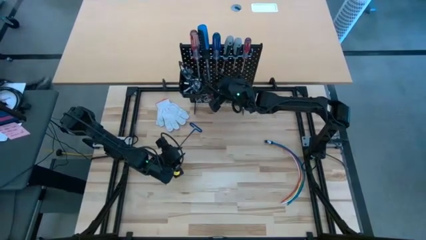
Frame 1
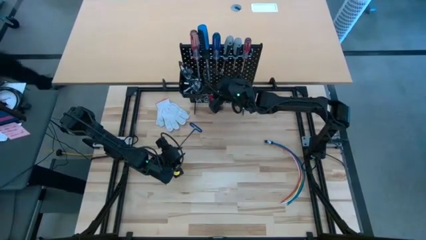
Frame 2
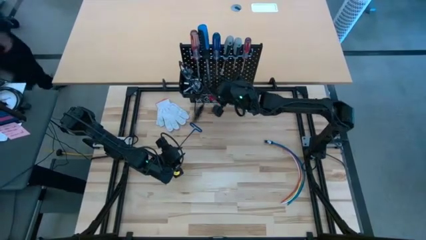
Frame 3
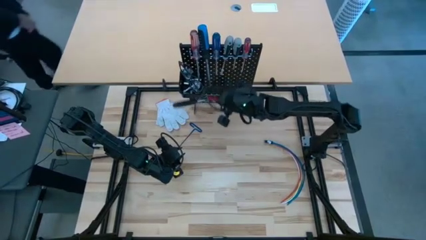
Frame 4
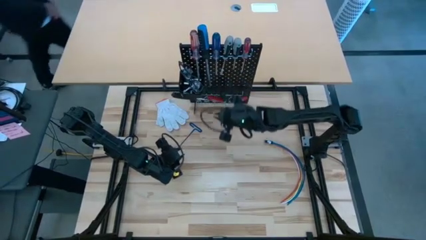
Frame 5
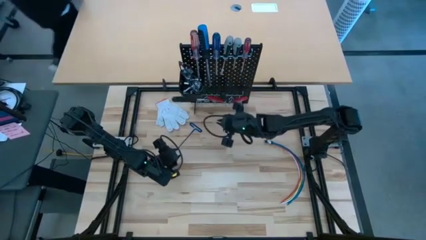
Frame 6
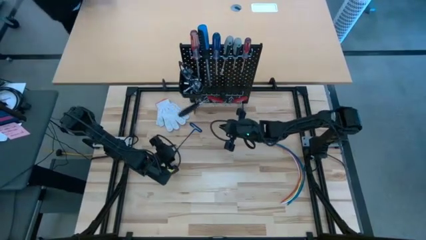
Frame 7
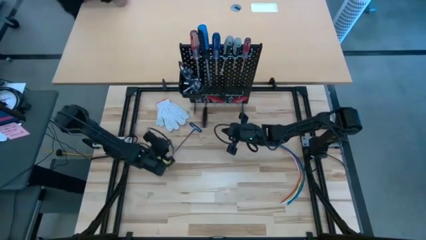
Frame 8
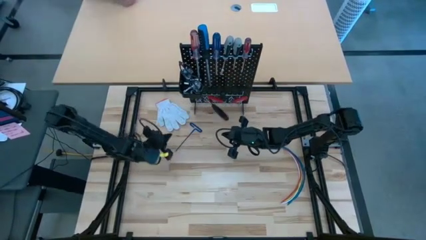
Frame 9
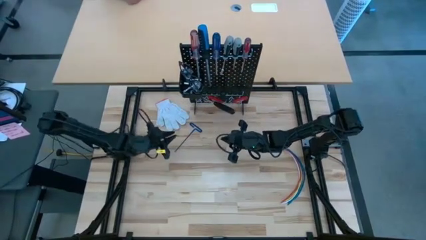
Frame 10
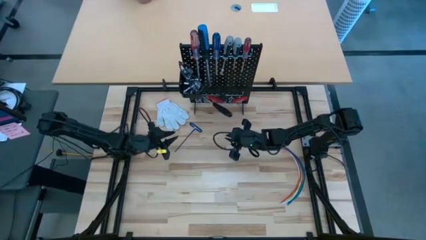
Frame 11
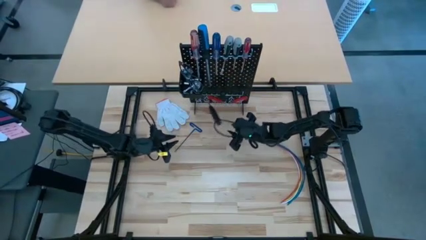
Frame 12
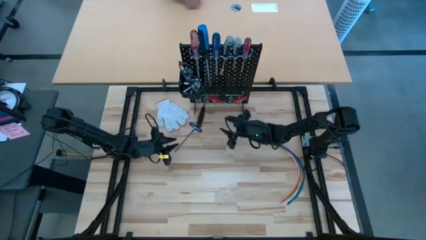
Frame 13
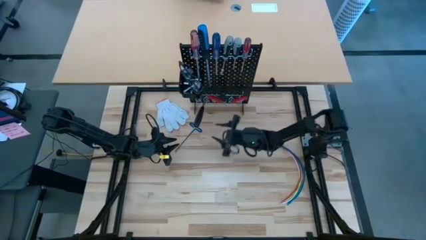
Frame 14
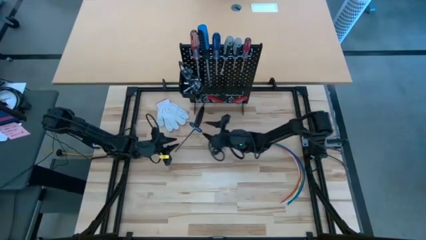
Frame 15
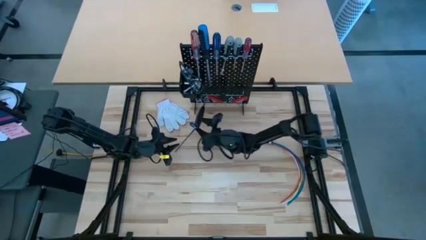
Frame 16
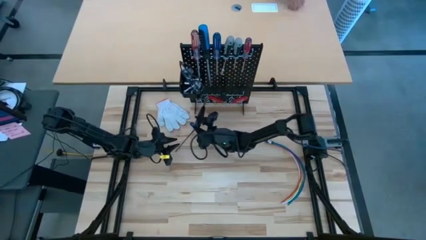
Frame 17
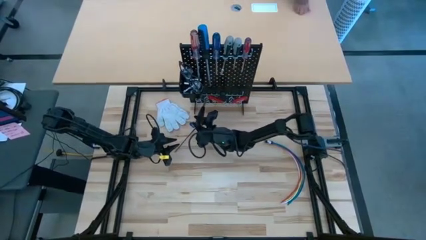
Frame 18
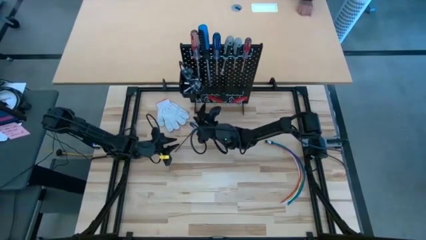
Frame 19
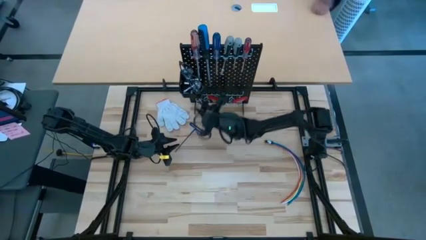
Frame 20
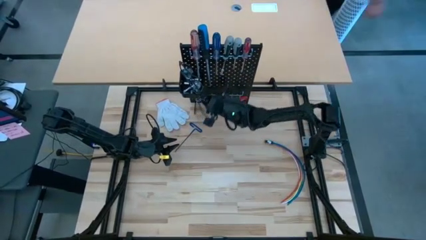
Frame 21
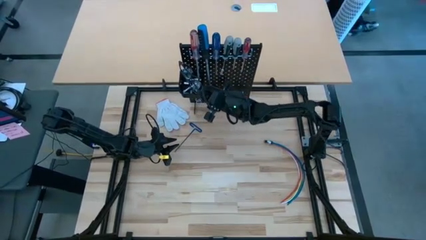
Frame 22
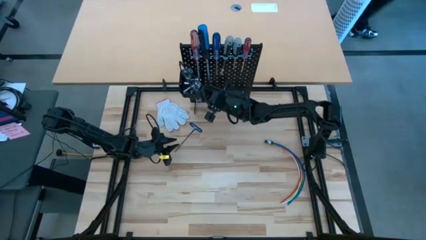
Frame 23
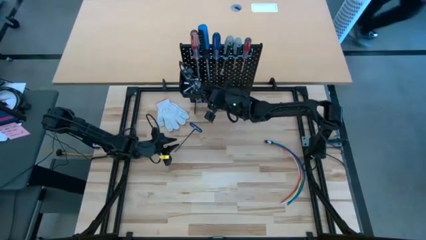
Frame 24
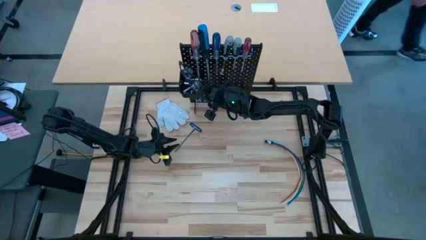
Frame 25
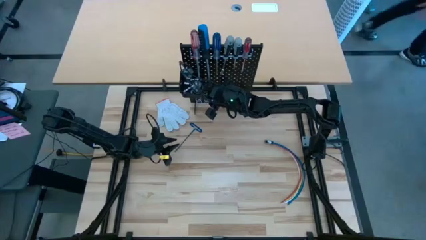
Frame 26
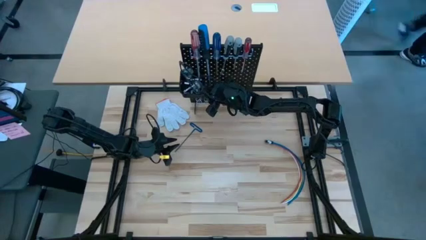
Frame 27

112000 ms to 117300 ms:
Task: Hang tools onto peg board
Hang the black screwdriver in the pegboard

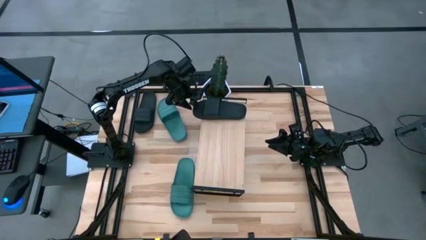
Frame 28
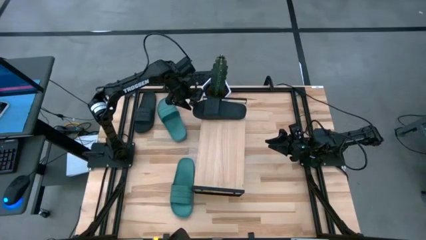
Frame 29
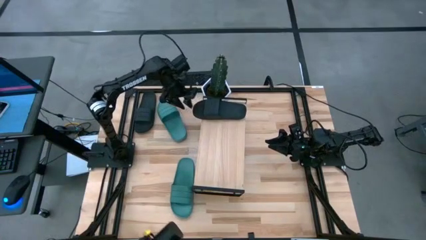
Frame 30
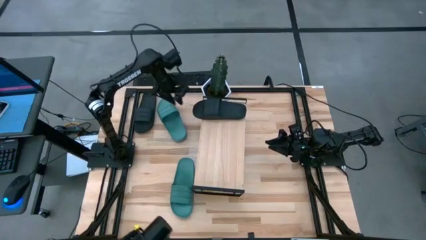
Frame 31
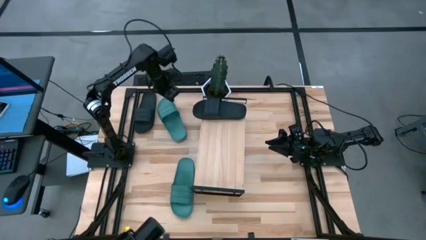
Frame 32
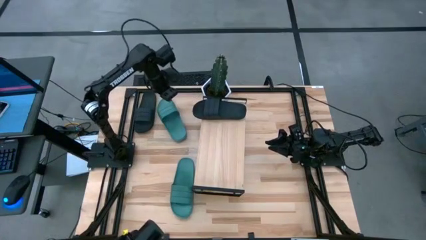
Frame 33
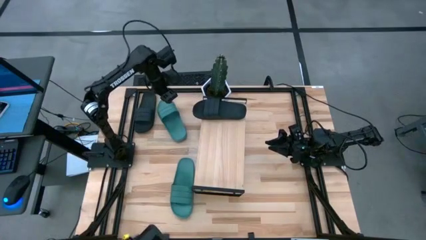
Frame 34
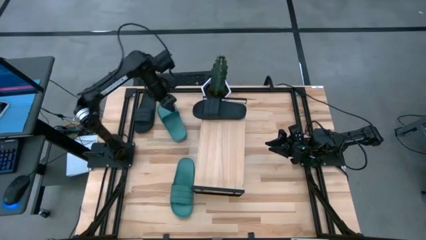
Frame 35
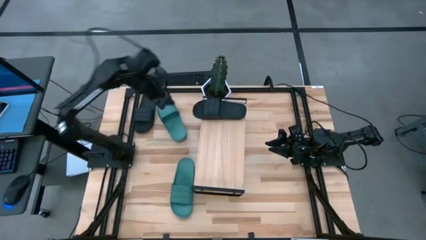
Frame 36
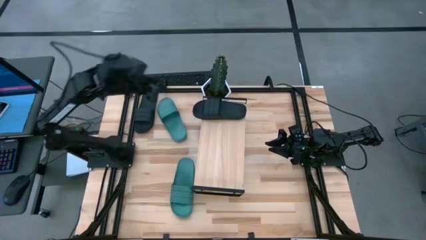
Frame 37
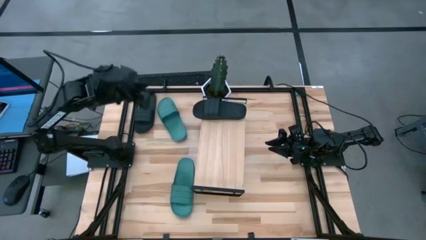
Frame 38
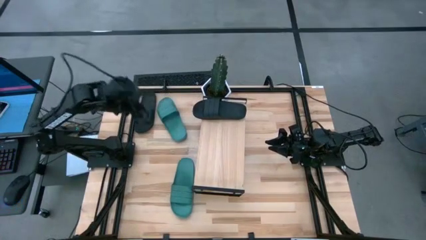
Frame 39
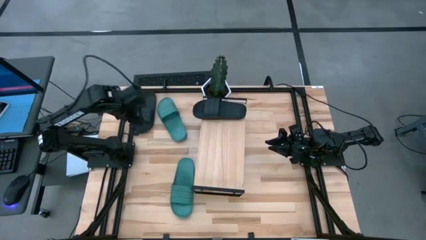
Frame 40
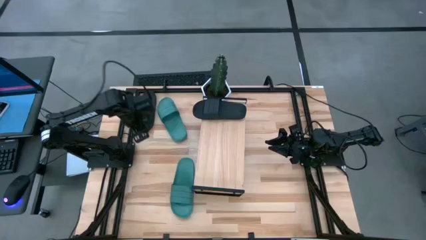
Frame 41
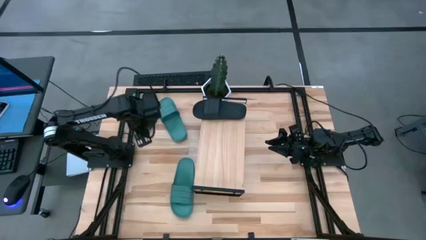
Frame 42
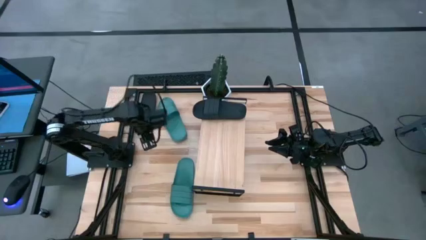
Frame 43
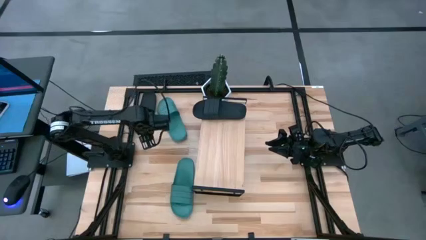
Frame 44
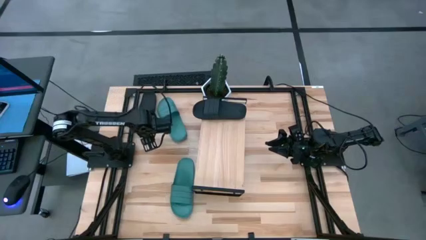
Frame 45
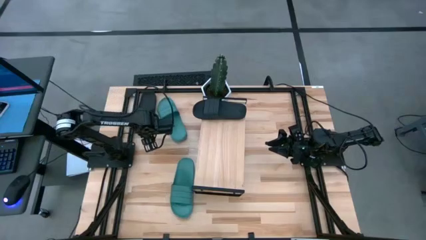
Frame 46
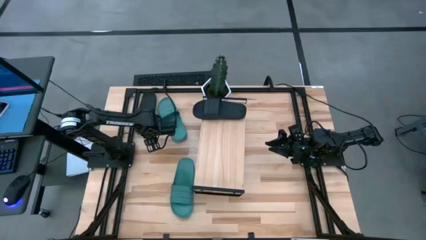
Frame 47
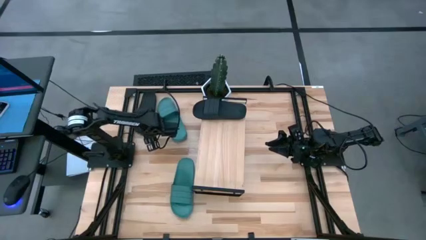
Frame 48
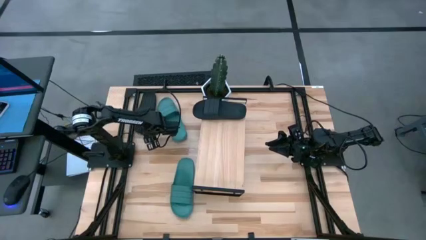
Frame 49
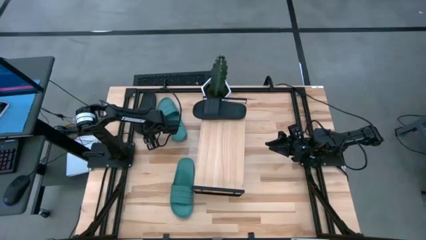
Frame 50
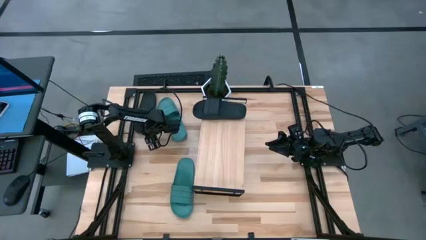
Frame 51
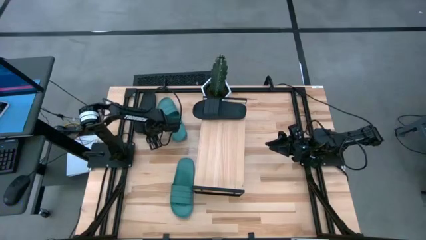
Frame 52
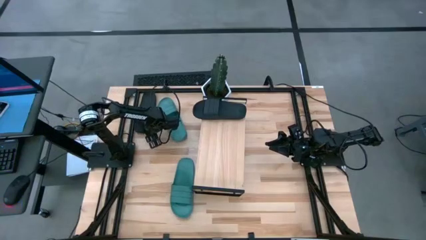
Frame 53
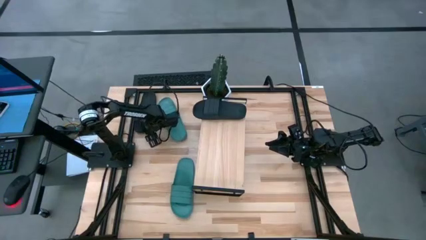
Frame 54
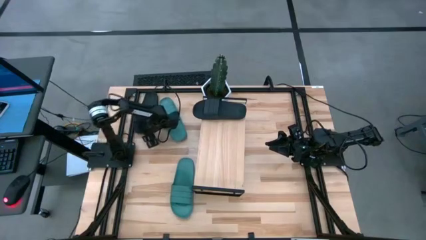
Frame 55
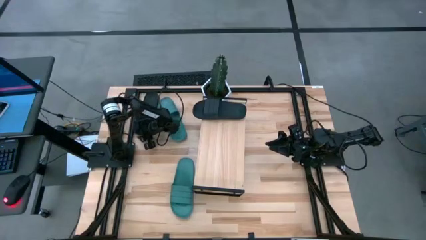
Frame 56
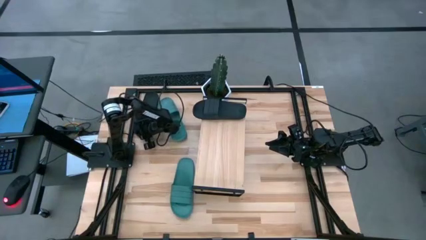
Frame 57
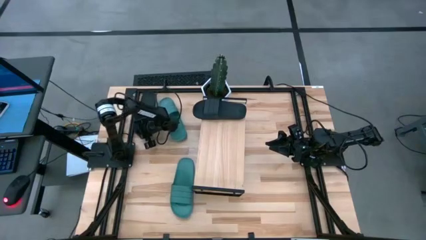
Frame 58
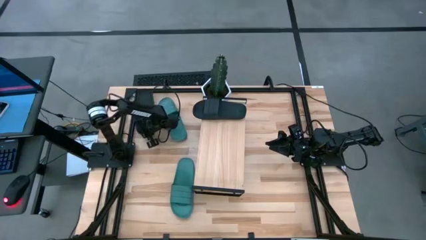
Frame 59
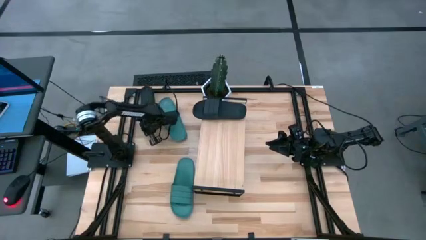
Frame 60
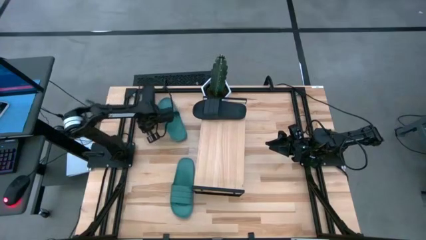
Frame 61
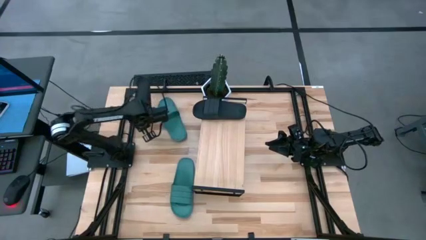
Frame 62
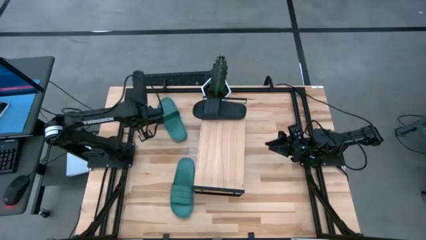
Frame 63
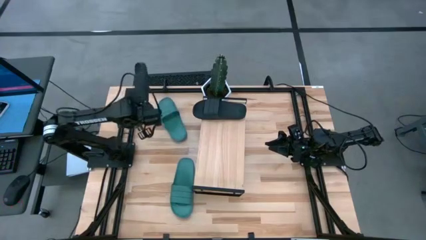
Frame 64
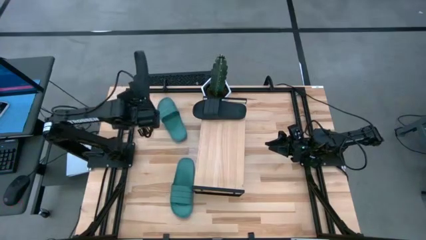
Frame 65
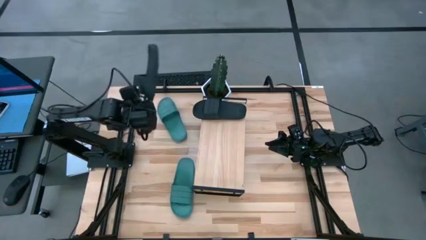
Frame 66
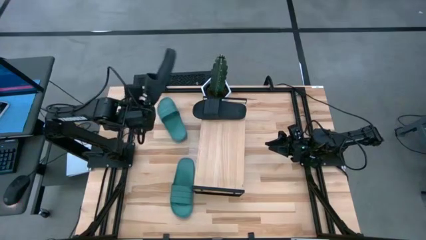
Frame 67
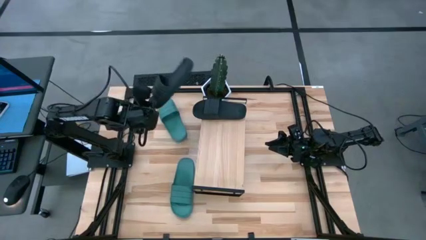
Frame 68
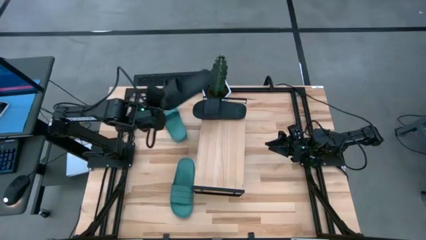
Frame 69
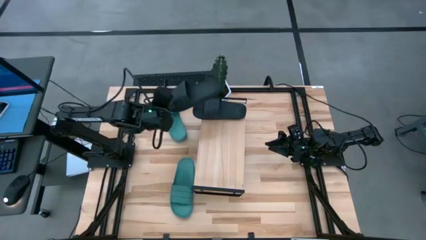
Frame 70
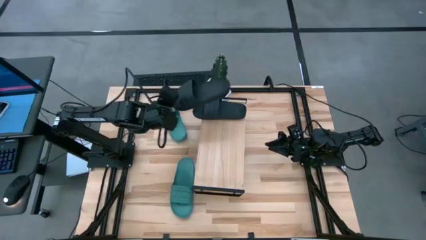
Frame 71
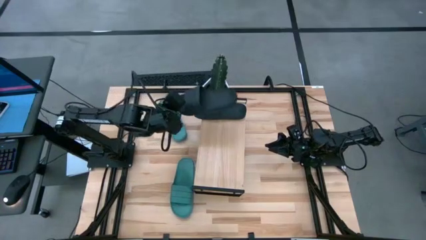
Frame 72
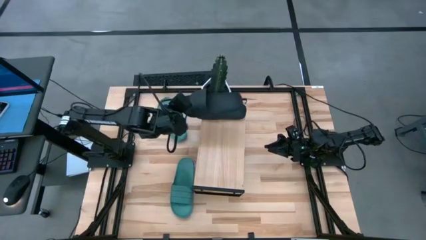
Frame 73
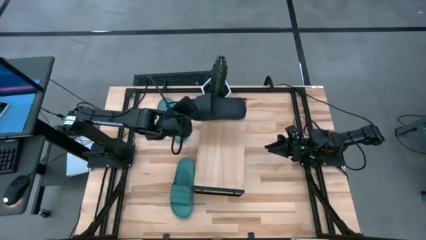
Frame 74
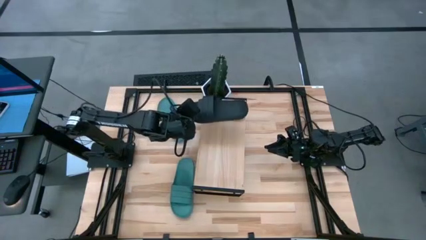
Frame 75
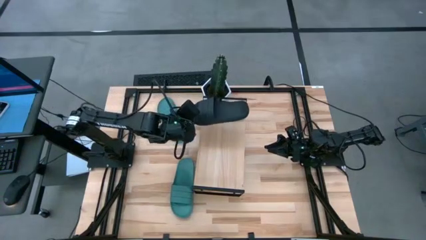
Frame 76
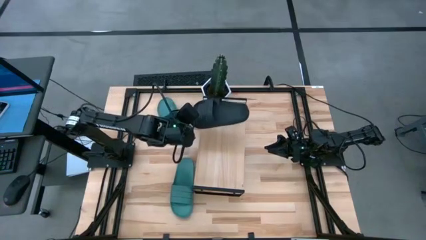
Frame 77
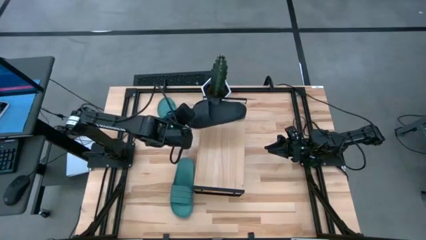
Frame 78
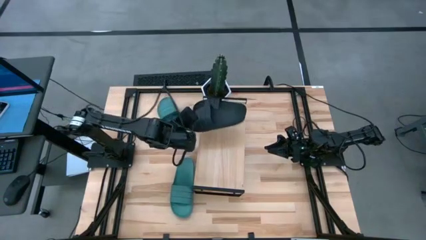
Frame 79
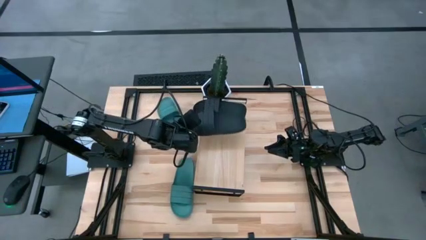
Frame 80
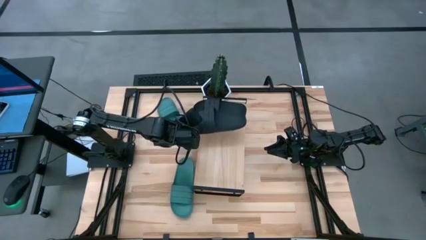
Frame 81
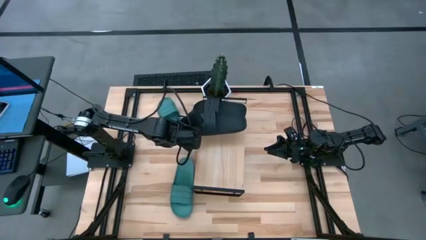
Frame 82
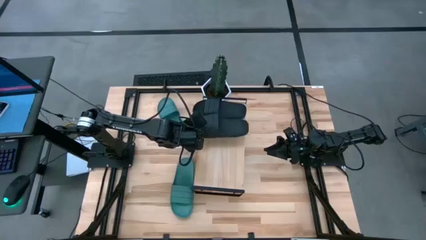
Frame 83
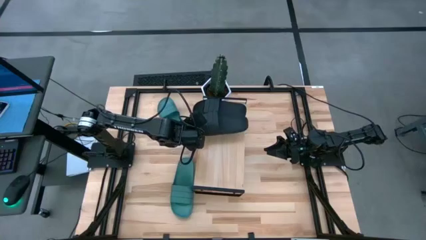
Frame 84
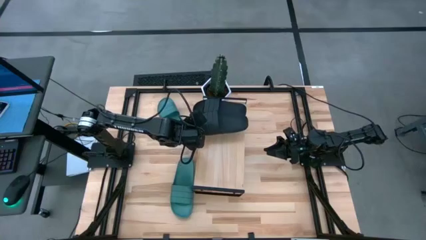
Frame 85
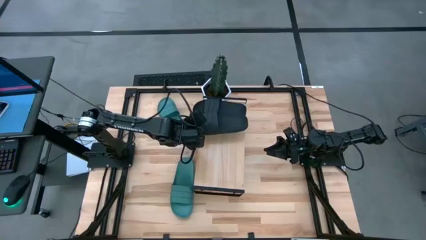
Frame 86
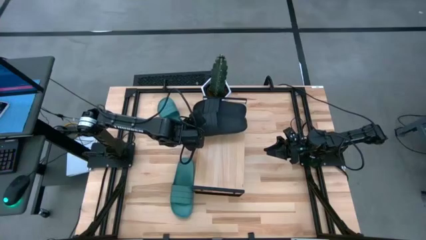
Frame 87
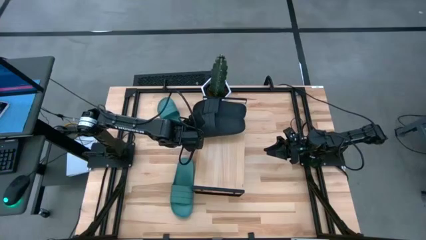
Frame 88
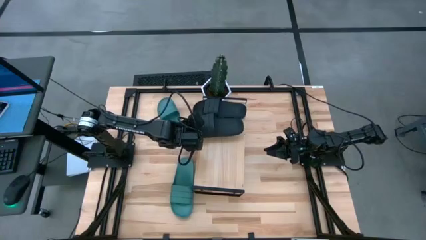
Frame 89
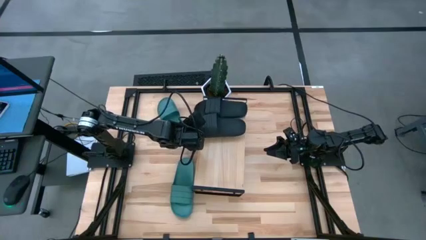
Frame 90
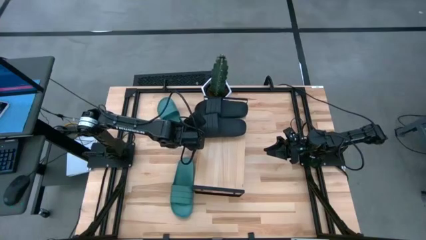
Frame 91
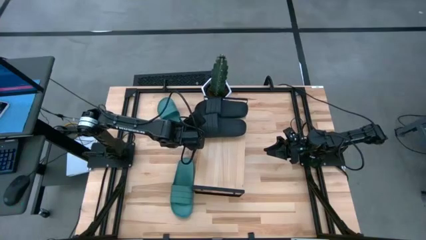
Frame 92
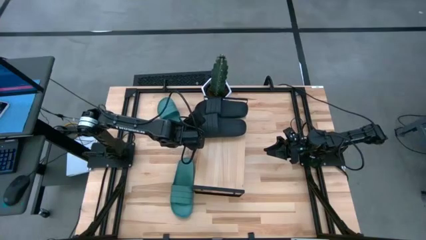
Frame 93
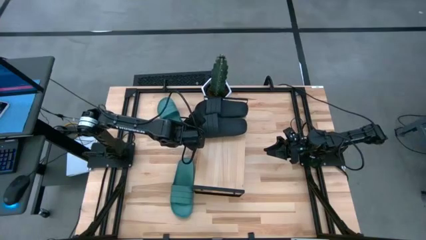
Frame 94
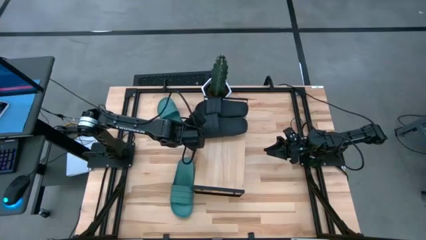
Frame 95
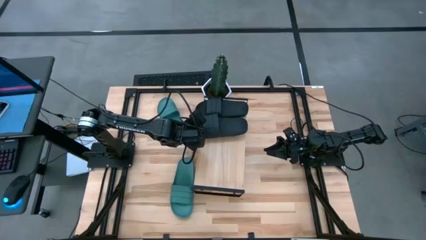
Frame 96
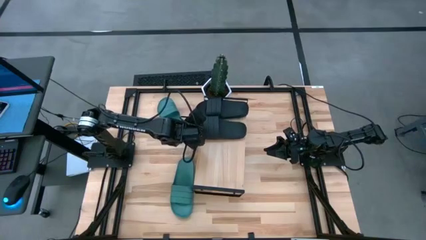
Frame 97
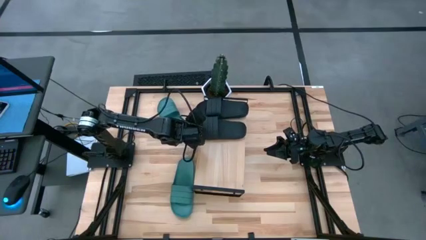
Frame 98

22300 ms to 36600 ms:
Task: Pick and place slides into the shelf
Put the black slipper on the shelf
